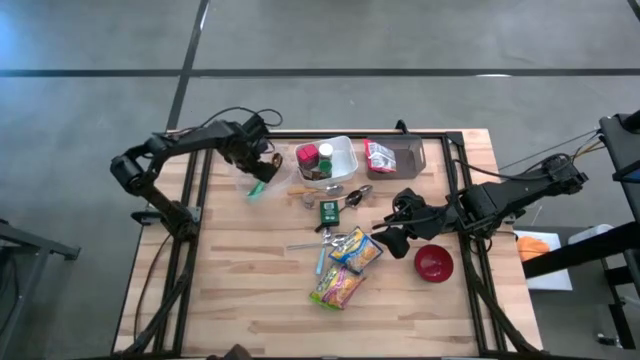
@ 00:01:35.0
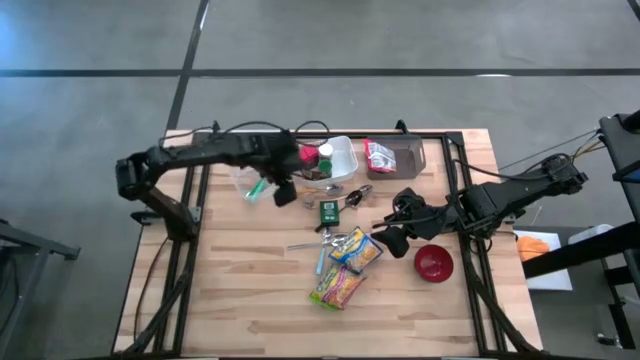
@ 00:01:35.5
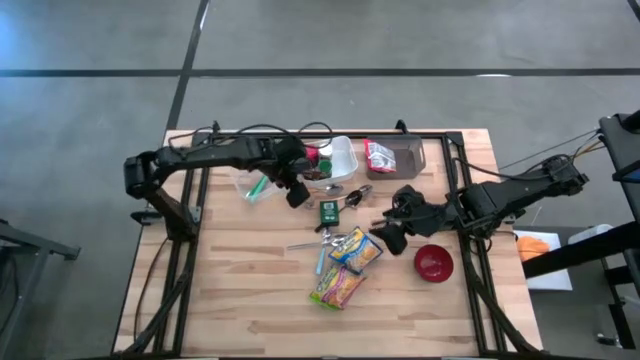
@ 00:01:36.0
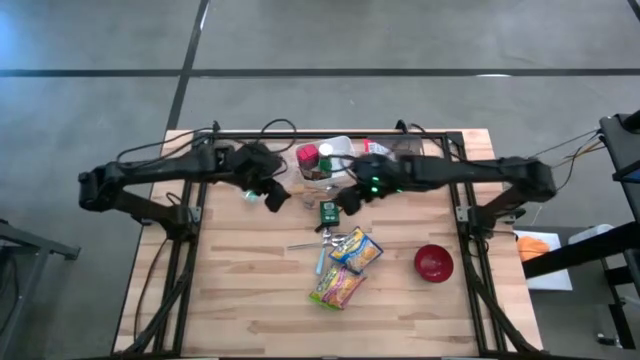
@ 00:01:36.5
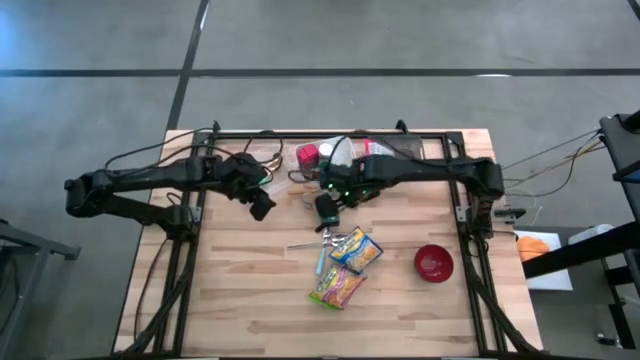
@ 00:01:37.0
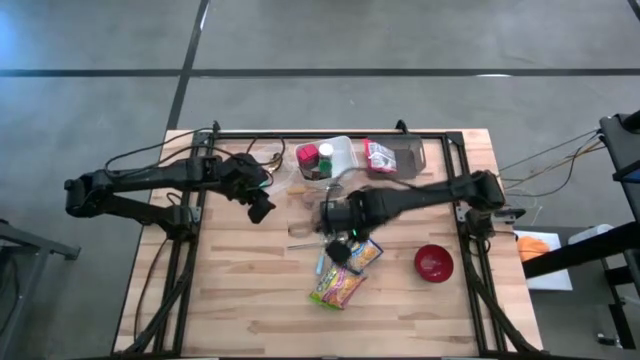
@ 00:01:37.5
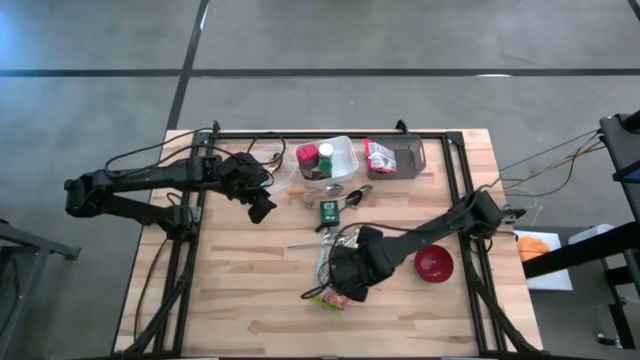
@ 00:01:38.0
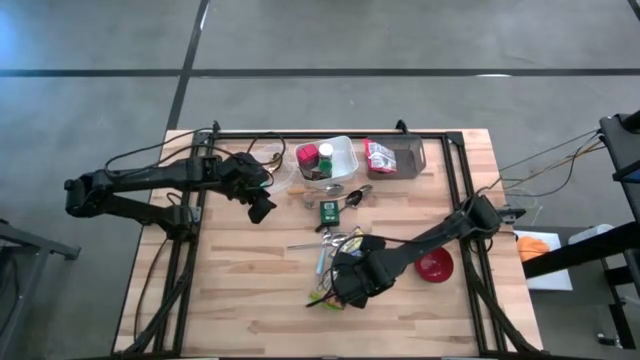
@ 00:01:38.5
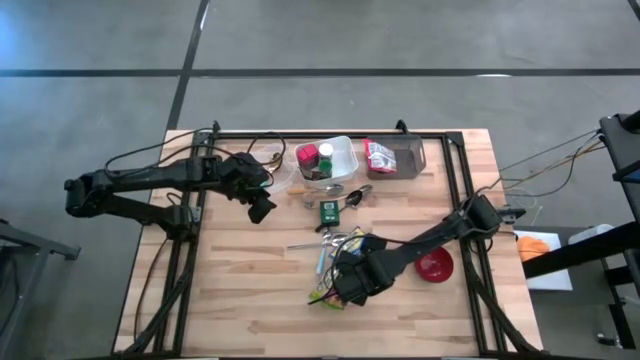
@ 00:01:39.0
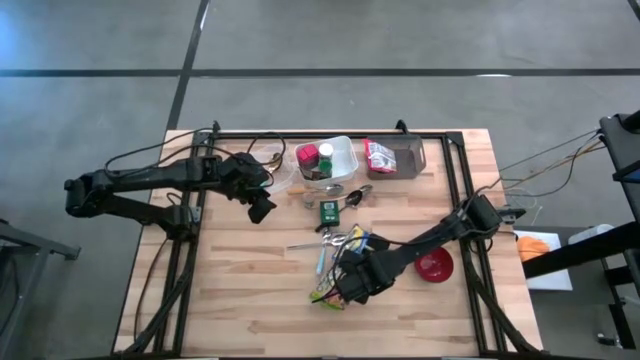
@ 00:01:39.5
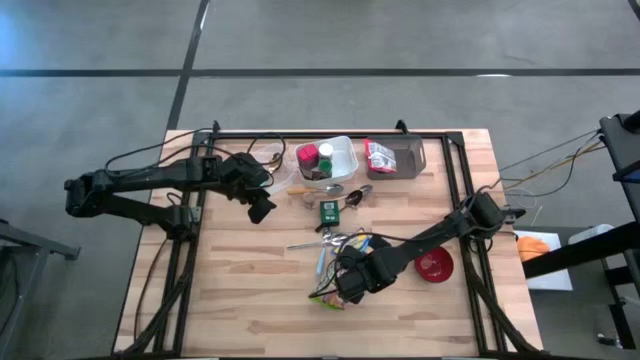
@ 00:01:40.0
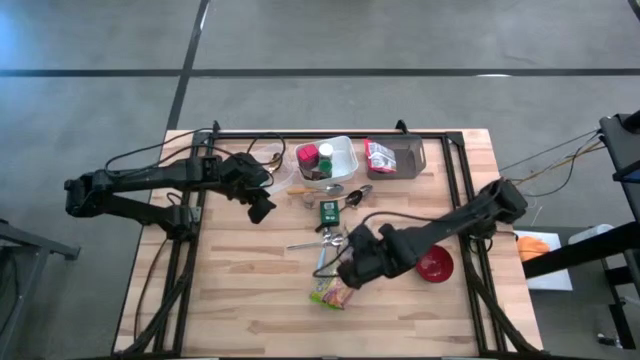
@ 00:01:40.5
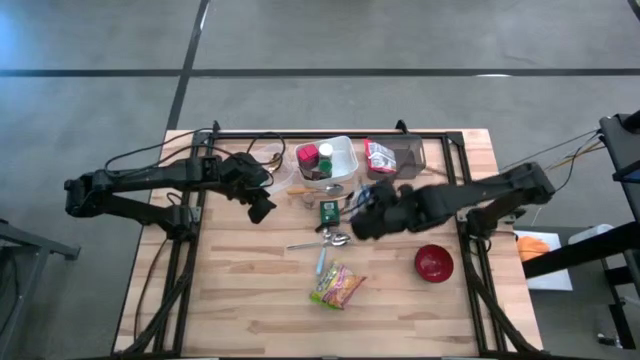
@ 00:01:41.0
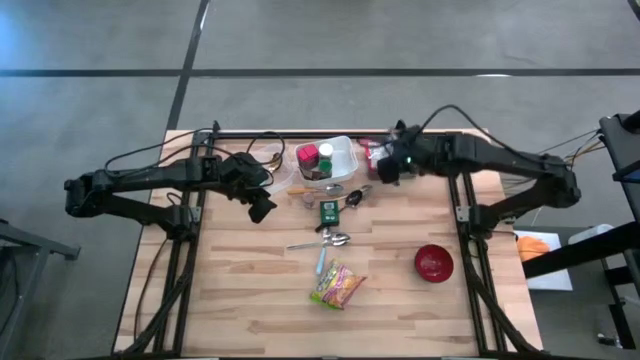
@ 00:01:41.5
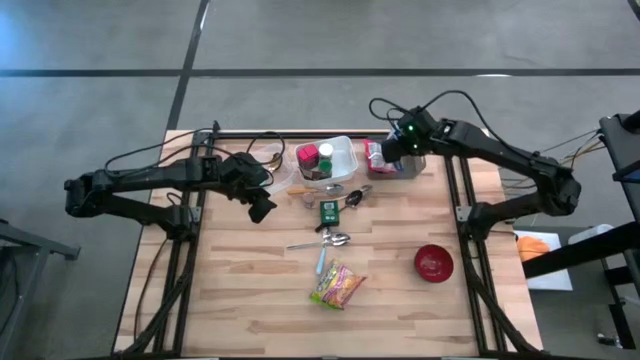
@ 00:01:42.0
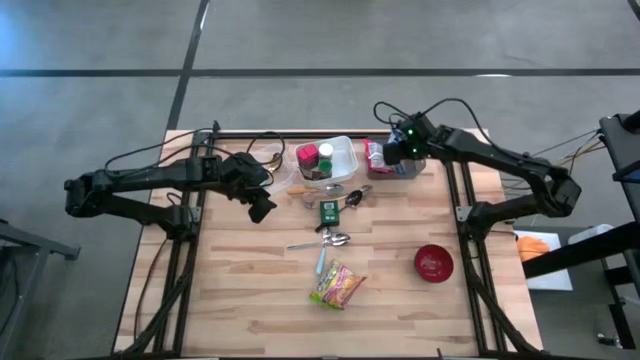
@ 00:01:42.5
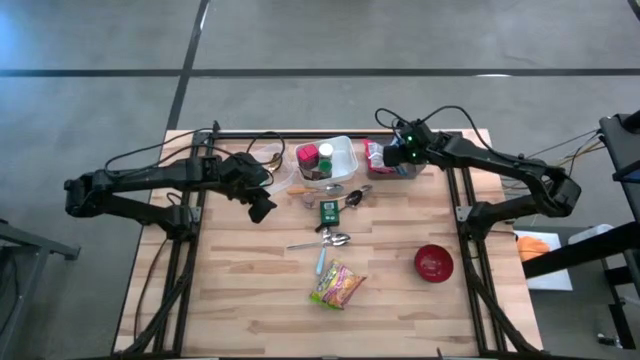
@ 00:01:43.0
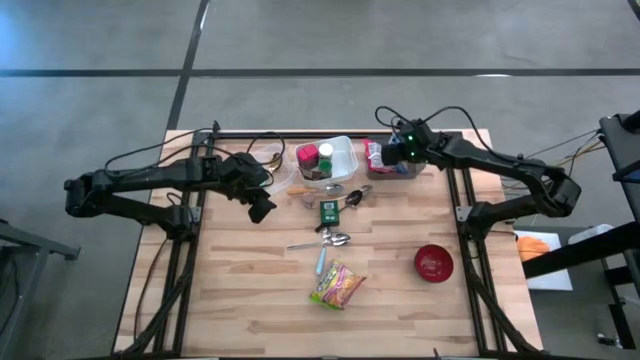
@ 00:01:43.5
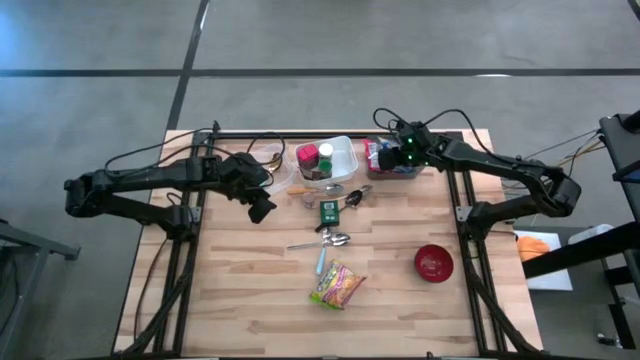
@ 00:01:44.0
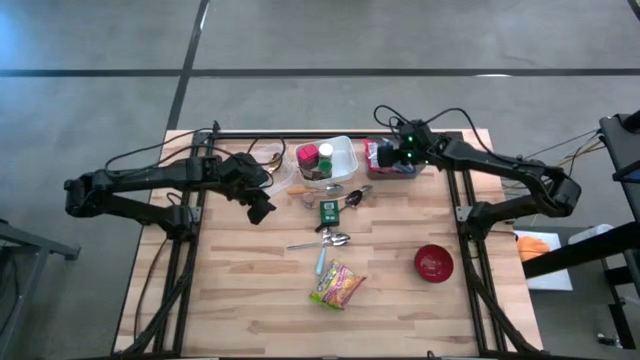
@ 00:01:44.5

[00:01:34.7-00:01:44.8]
Put the blue noodle pack into the black bin

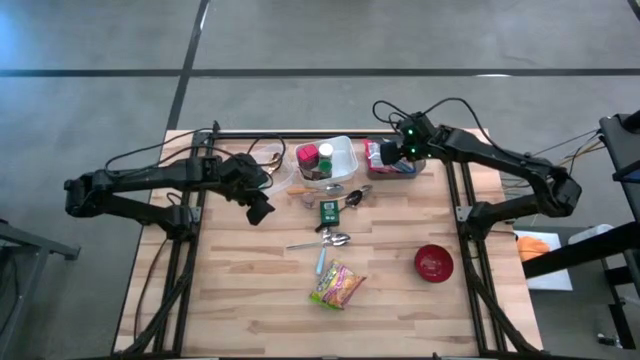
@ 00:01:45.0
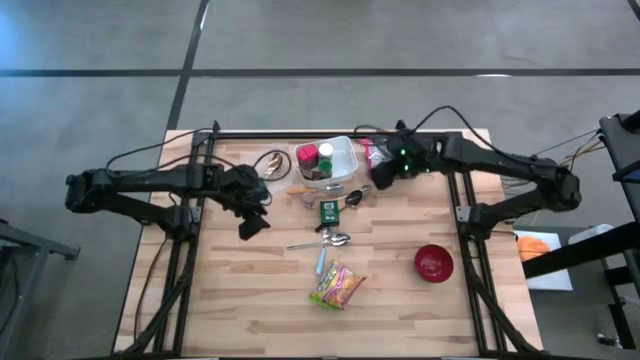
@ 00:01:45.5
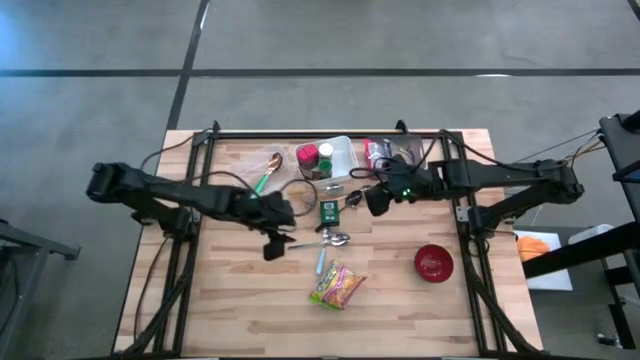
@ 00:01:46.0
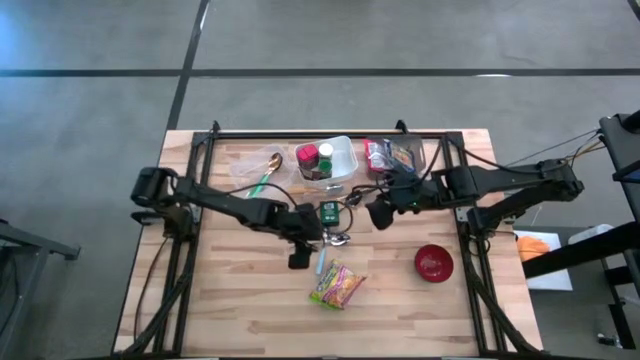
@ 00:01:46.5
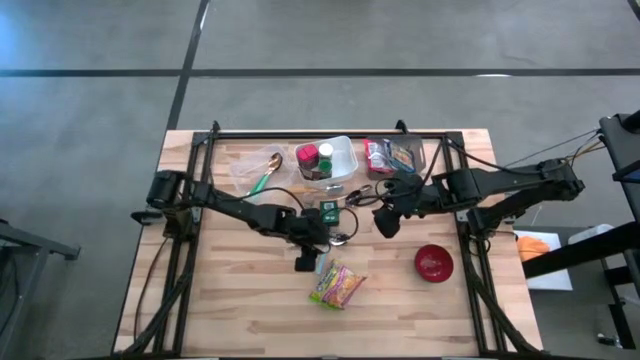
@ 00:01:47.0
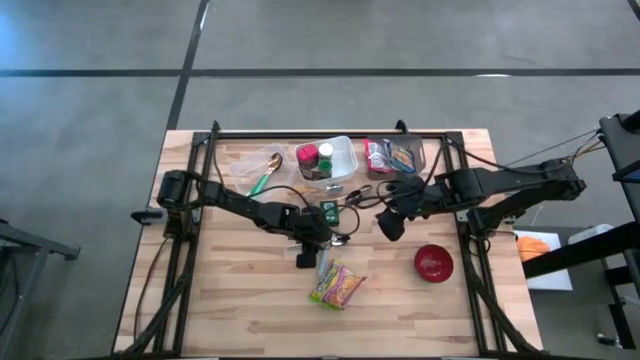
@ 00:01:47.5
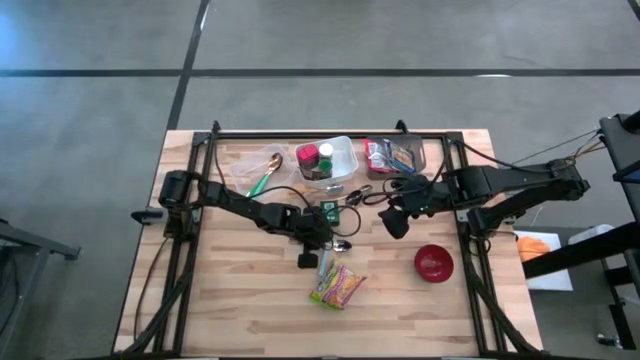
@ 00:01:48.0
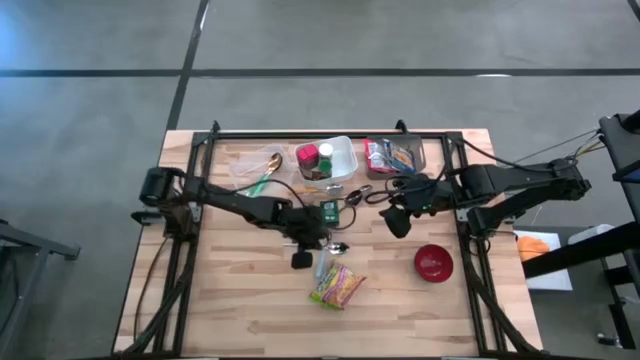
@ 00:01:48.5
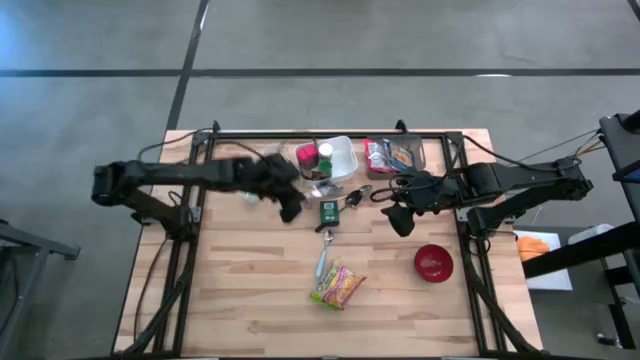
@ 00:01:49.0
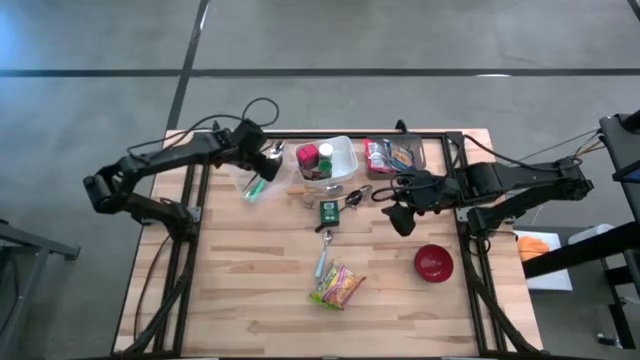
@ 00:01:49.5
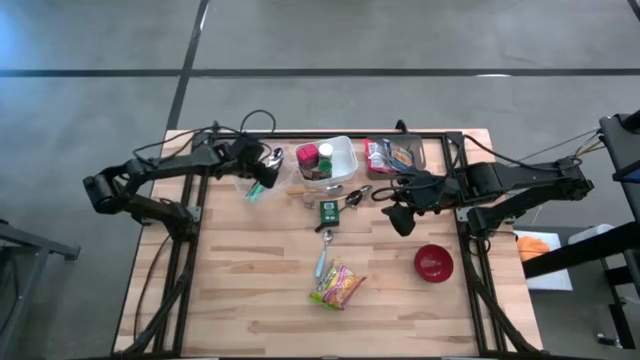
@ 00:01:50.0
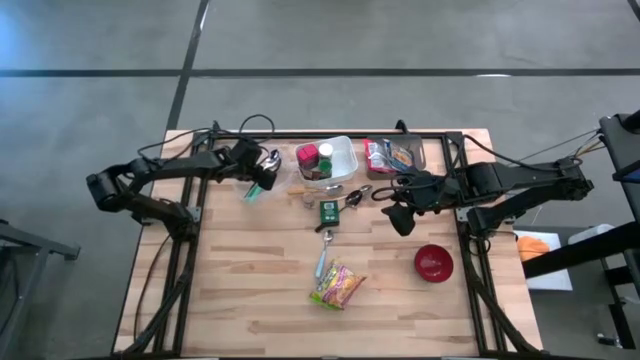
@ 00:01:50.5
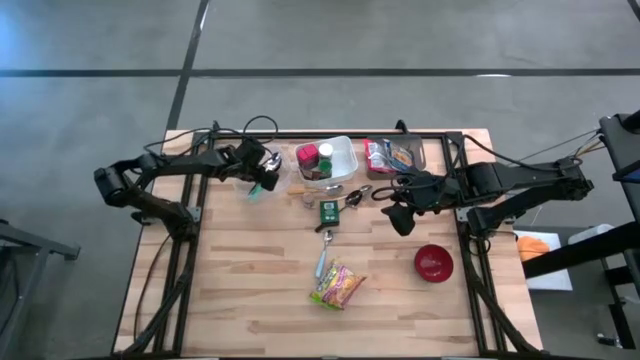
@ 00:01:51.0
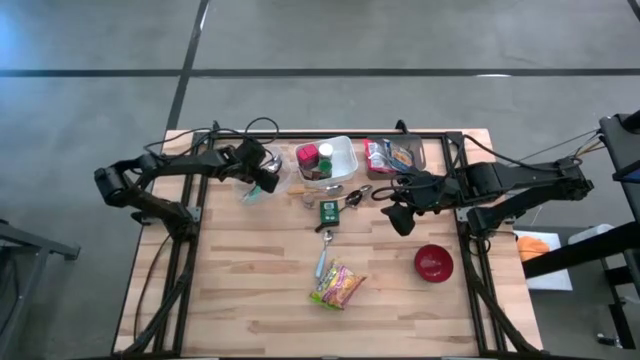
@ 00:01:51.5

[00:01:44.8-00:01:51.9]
Put the silver spoon into the transparent bin

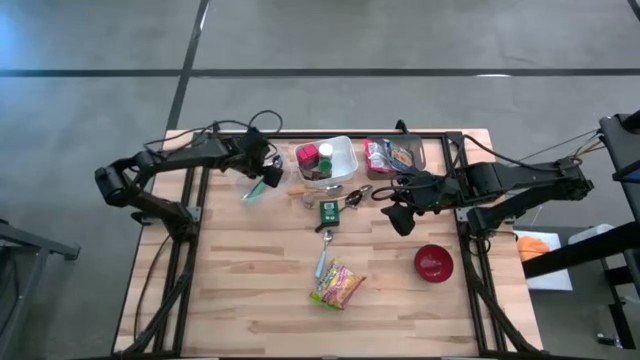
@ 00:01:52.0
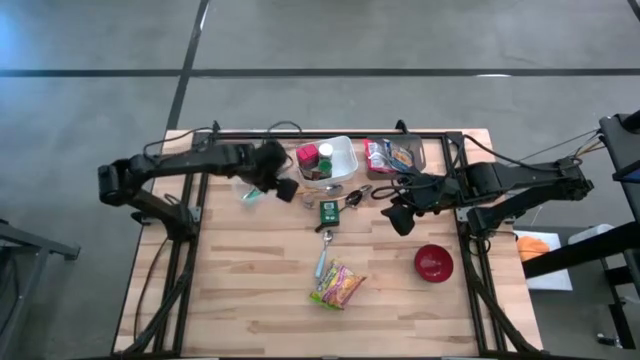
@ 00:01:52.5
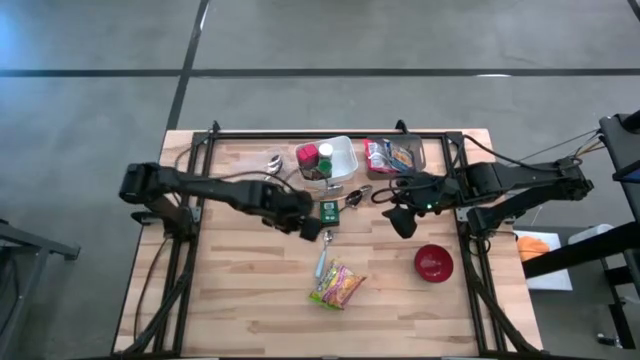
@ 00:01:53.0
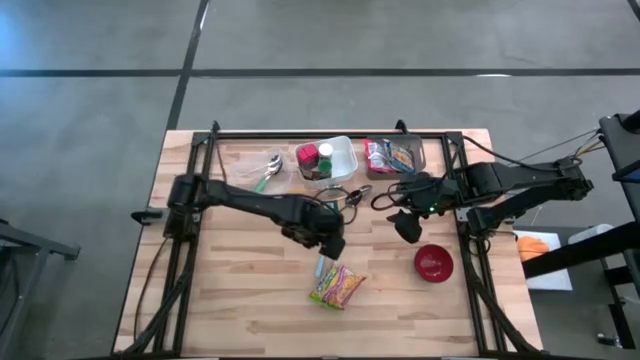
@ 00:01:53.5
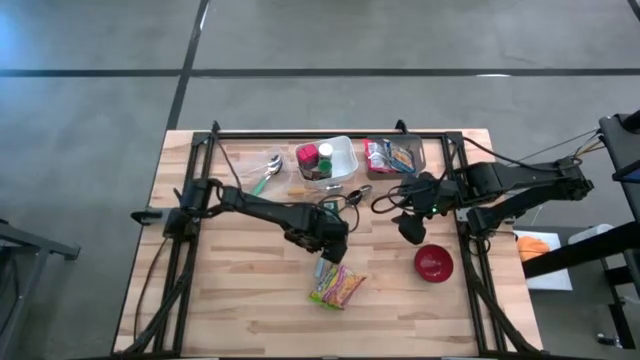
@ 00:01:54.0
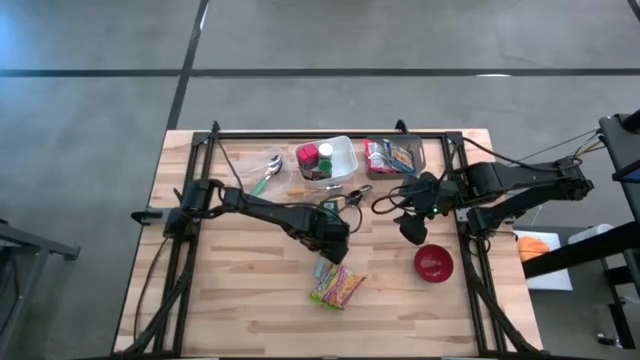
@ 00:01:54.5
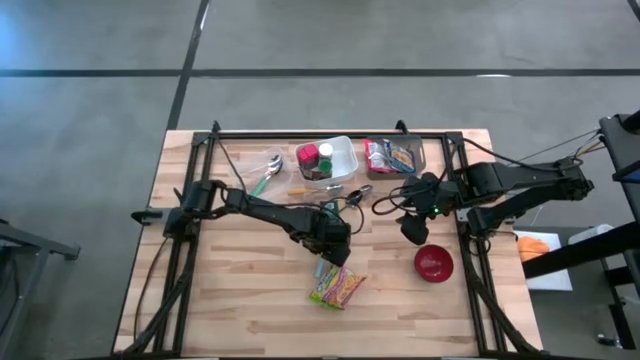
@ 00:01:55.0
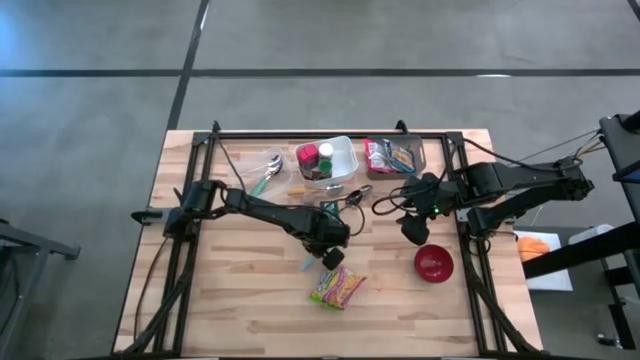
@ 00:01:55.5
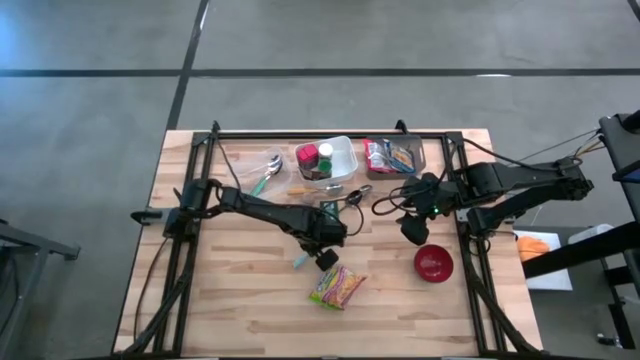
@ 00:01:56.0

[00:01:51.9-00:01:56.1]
Put the blue spoon into the transparent bin
